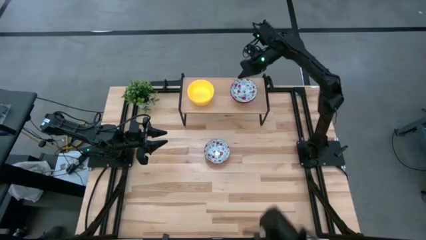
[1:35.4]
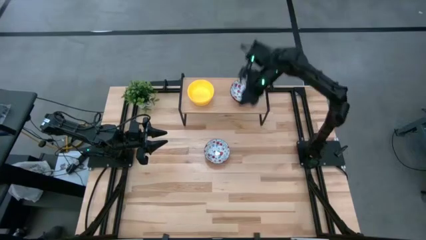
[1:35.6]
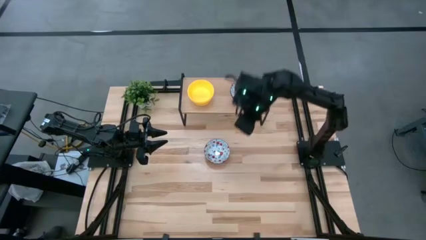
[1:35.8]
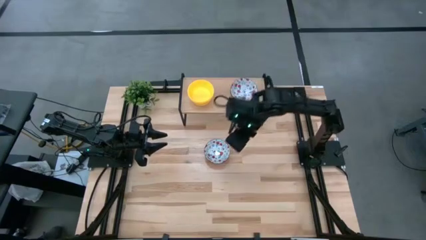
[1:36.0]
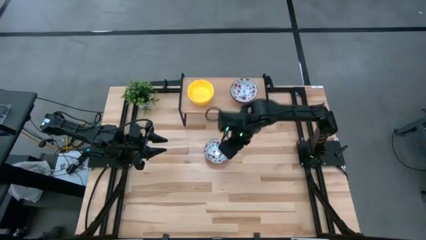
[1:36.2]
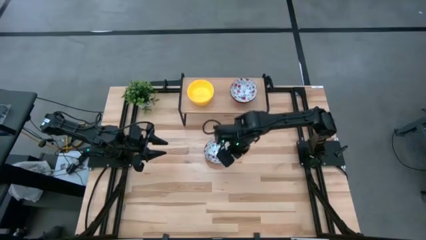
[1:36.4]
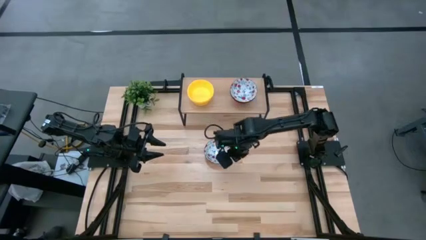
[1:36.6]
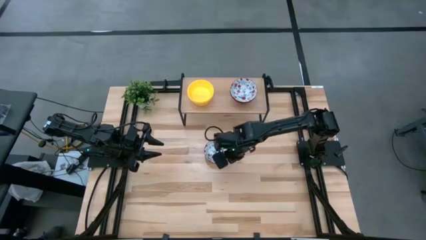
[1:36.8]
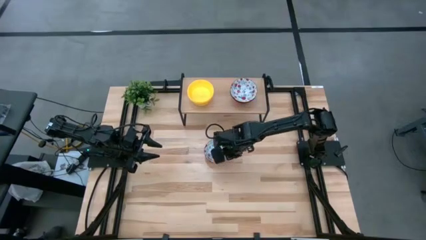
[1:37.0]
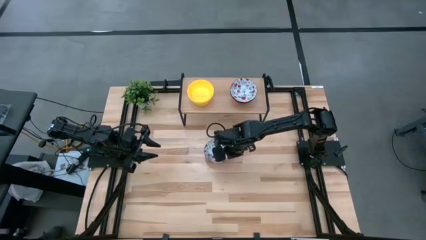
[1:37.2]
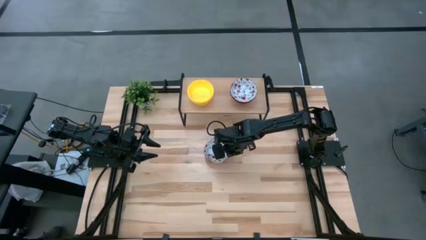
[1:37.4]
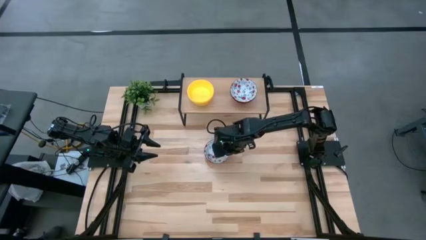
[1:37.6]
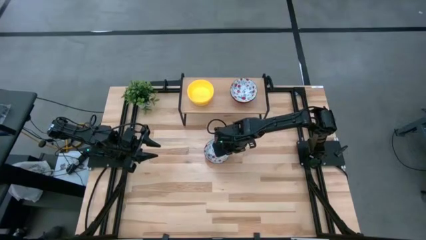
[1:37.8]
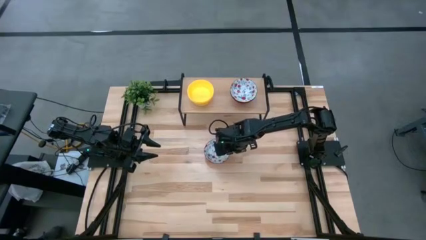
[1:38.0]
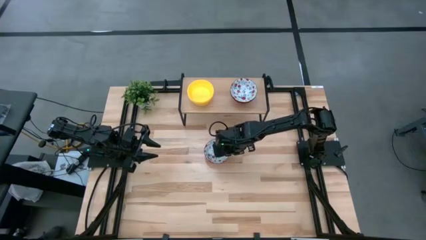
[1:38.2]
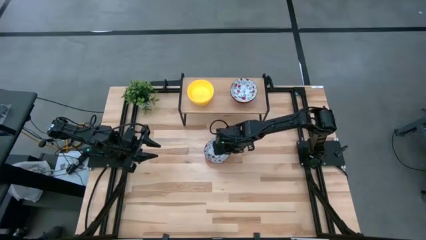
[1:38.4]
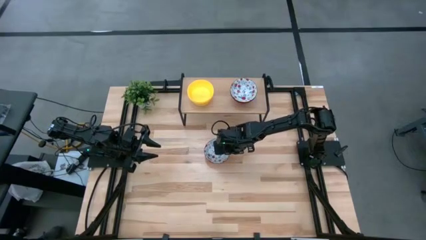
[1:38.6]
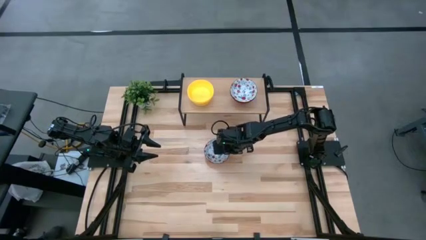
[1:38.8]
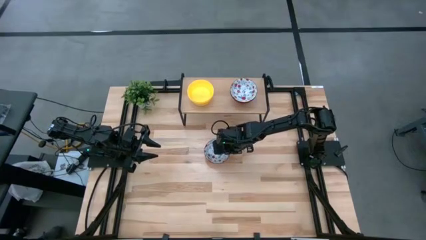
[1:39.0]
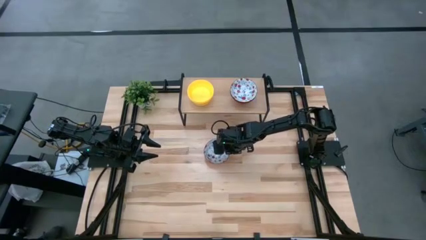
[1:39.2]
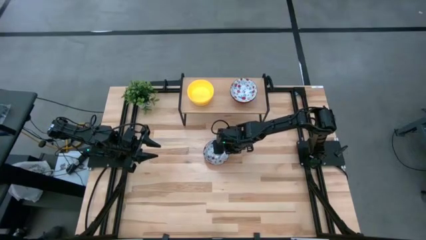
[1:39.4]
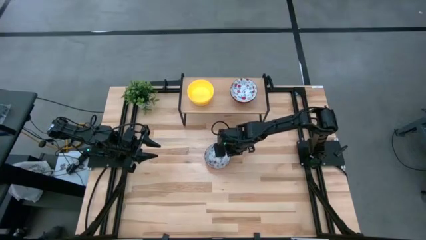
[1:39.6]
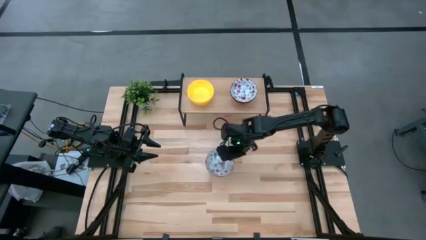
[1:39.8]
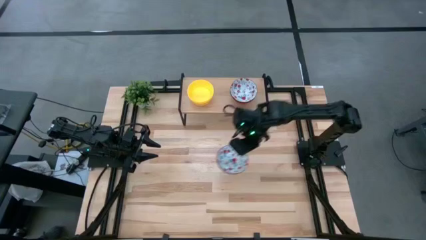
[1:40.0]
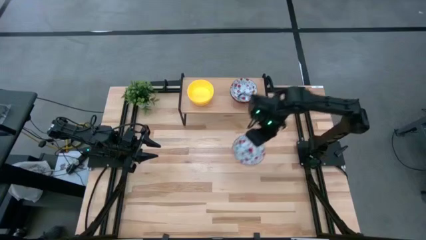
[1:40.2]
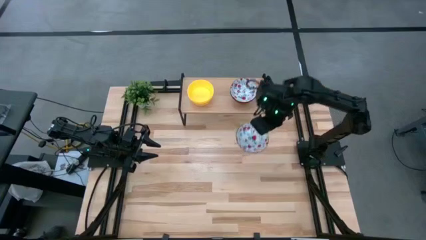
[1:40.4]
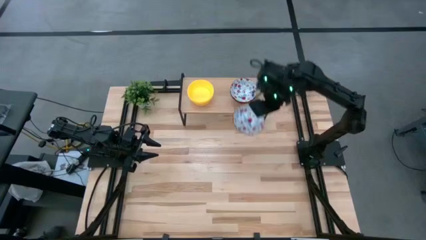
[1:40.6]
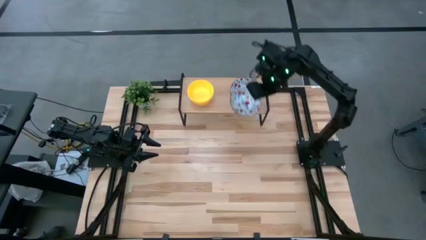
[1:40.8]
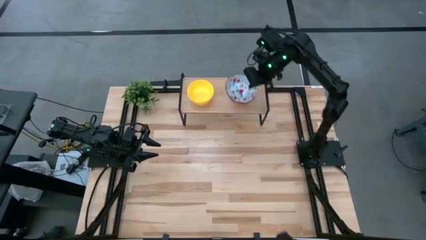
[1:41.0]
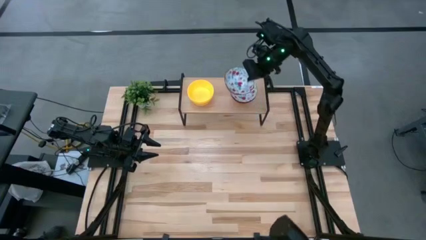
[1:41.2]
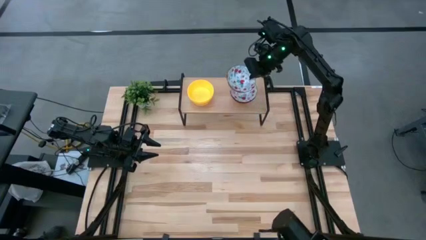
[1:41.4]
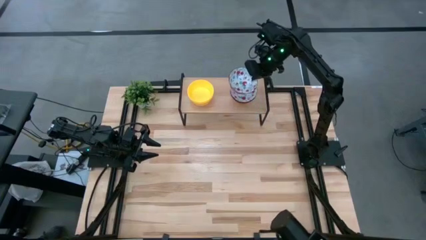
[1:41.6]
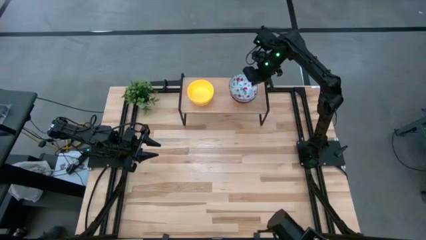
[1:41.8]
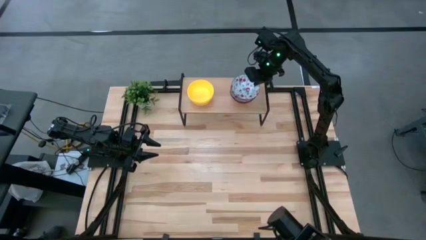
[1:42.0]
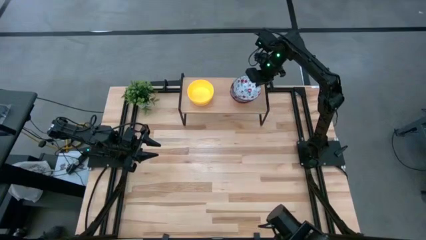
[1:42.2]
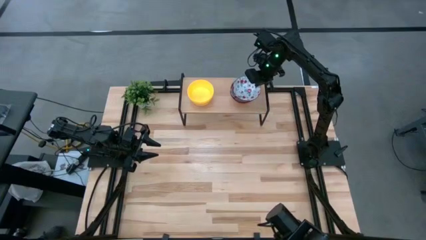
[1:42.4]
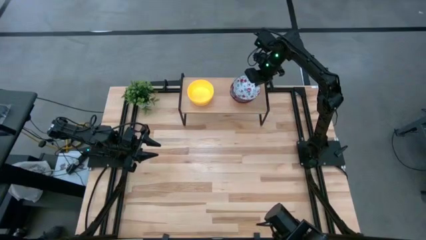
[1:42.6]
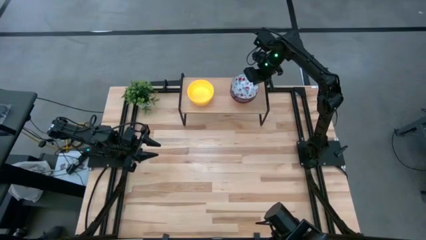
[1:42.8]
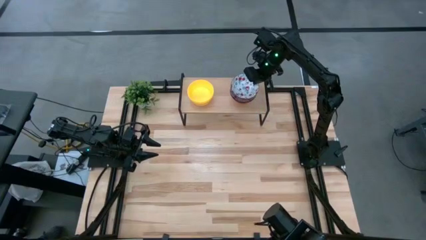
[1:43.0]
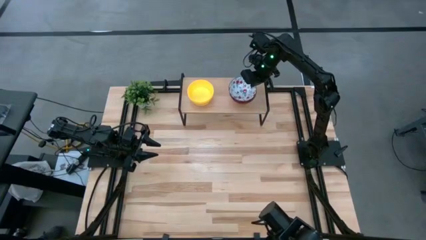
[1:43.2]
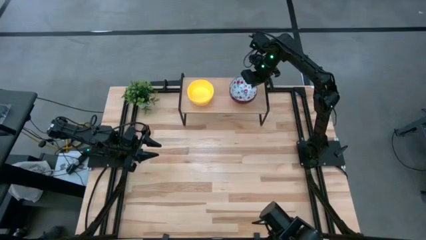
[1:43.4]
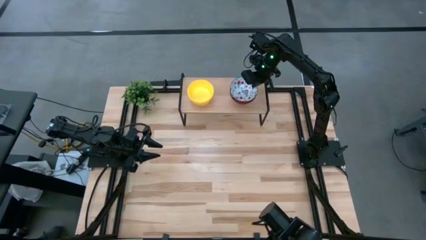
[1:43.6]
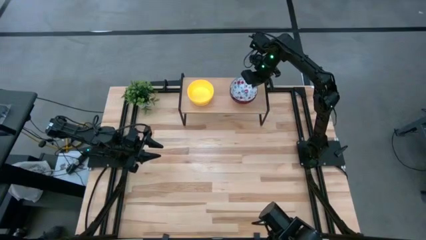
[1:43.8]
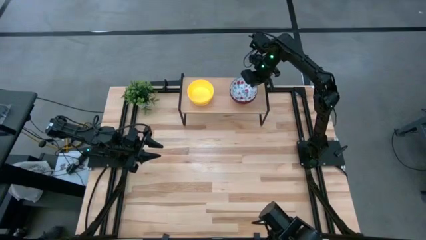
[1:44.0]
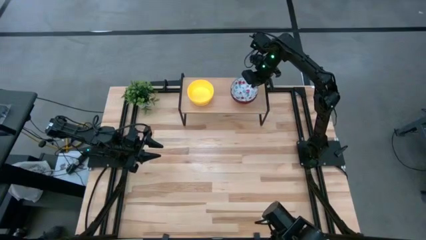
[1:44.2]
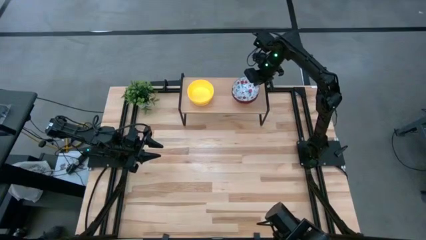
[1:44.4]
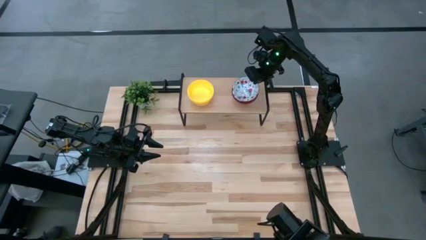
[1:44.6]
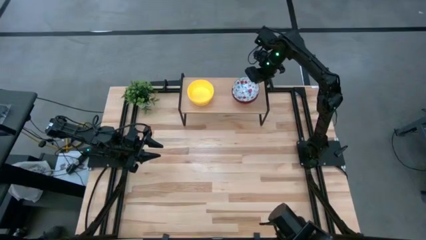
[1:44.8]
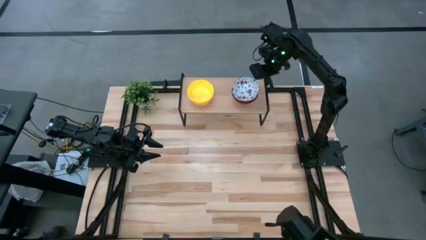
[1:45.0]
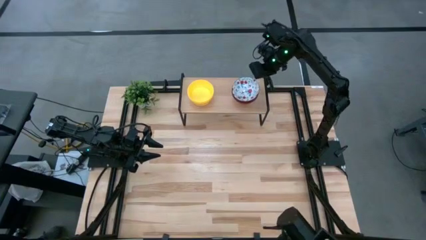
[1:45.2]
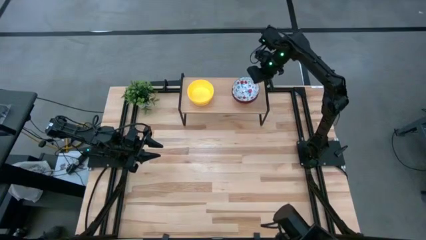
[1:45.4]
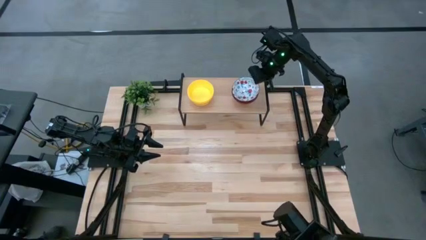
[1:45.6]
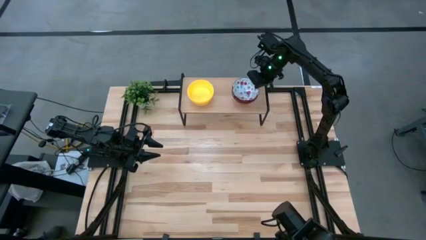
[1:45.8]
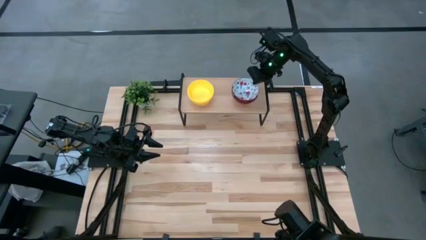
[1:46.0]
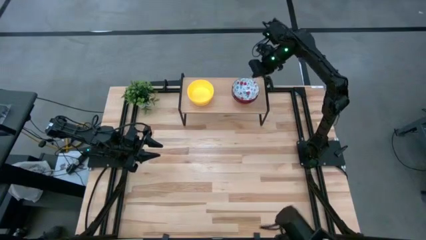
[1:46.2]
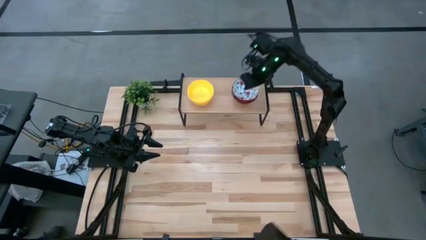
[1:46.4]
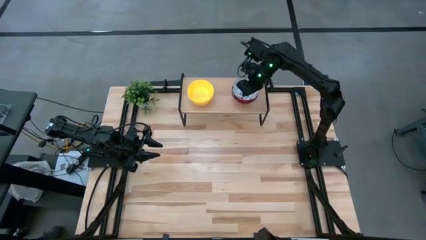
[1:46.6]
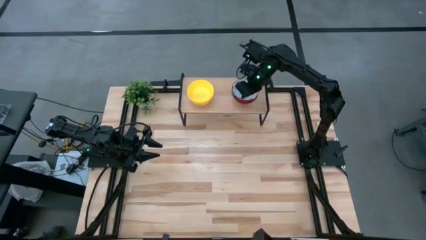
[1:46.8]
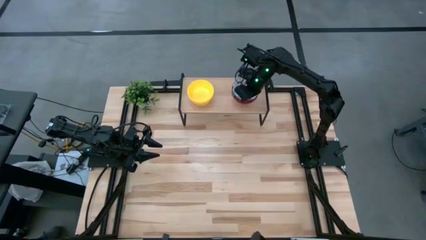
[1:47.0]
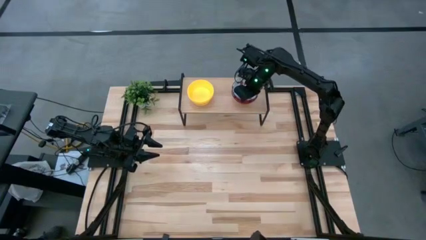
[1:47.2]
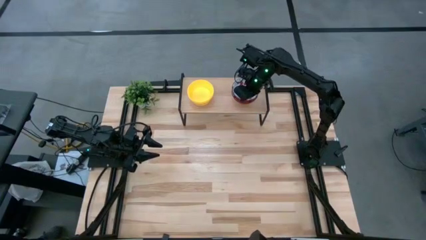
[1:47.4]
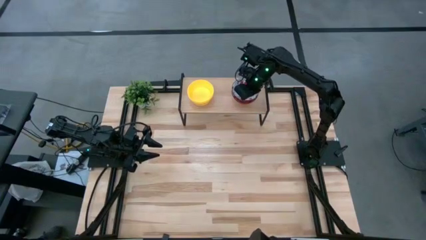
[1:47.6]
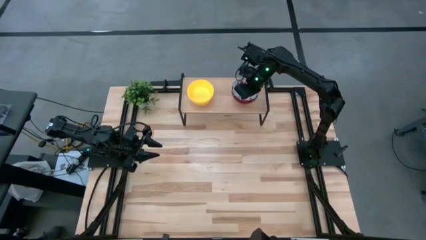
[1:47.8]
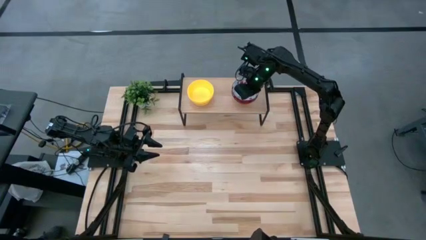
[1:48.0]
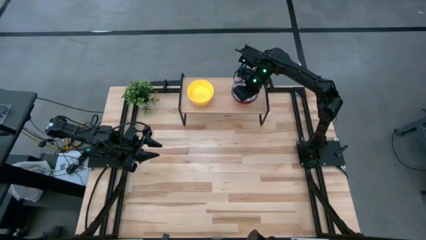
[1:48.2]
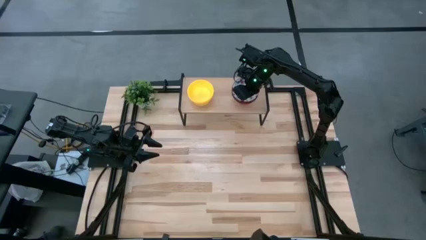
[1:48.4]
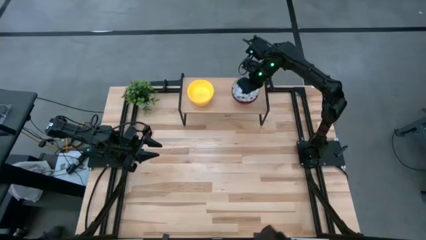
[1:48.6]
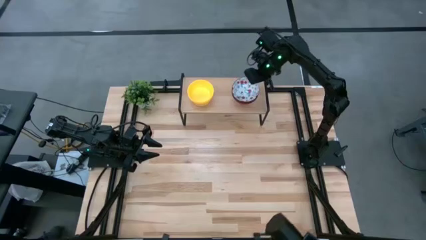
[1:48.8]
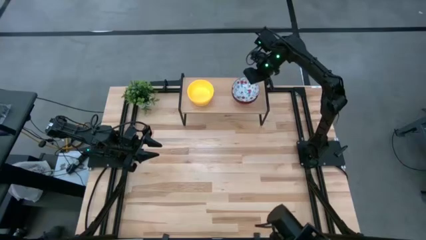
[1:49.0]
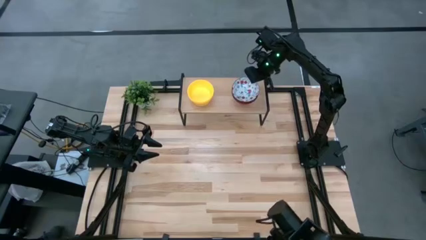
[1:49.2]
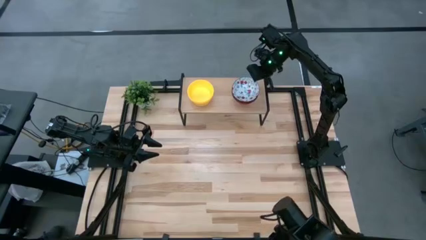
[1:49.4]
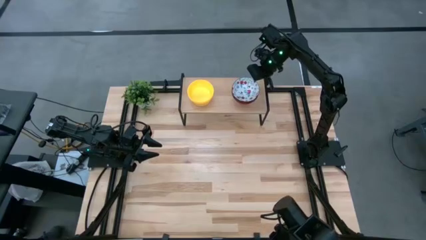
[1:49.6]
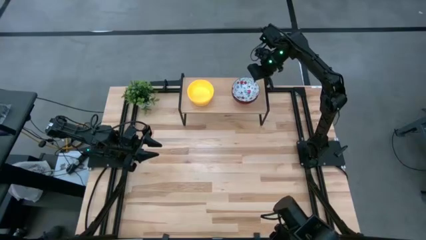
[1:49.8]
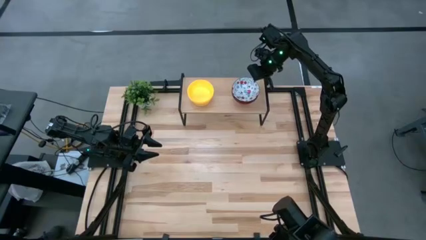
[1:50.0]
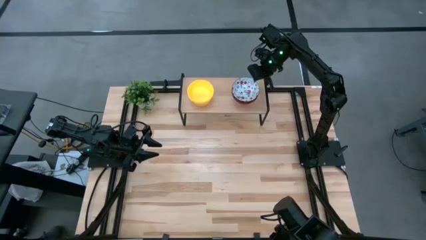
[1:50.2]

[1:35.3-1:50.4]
Task: Pick & Place Mini bowls
Stack the white bowl on top of the white bowls on the shelf

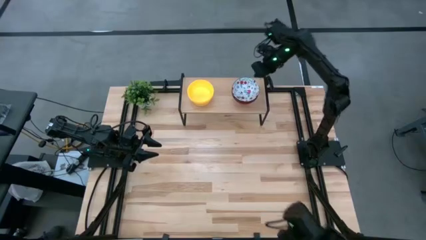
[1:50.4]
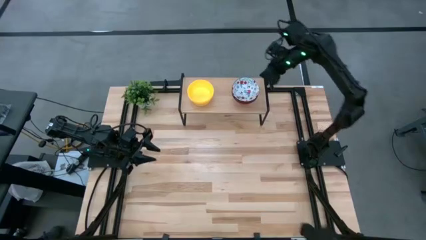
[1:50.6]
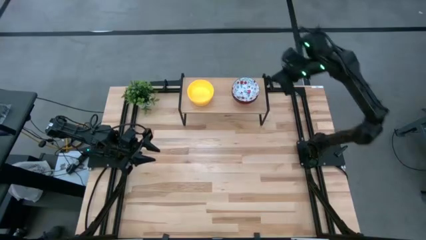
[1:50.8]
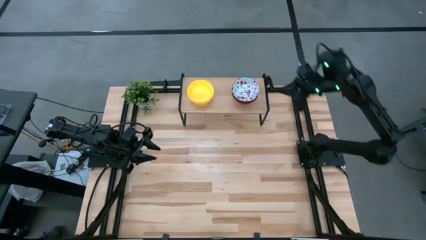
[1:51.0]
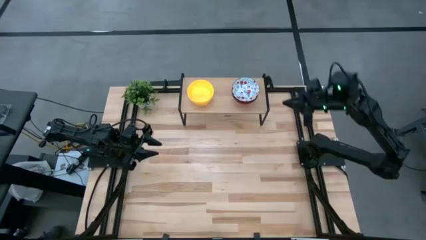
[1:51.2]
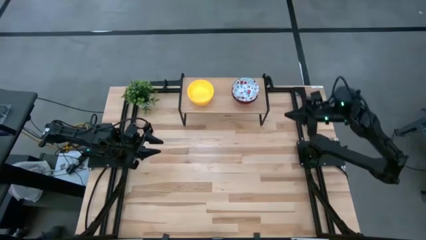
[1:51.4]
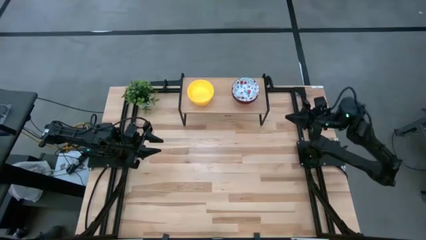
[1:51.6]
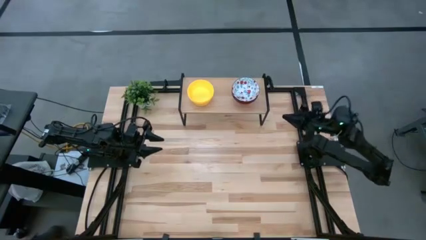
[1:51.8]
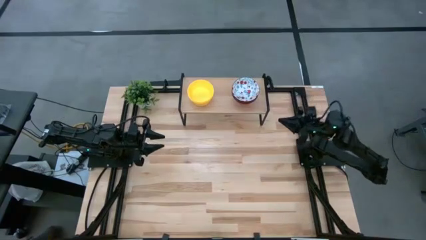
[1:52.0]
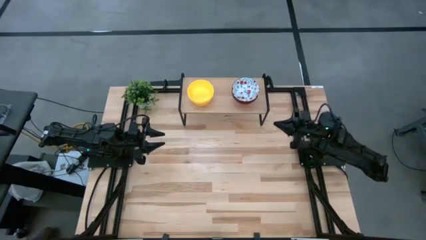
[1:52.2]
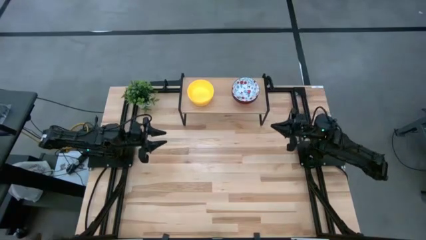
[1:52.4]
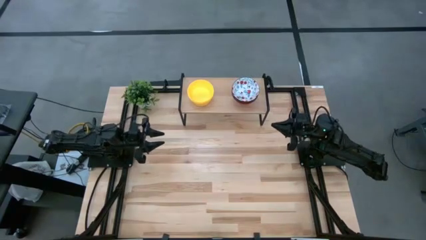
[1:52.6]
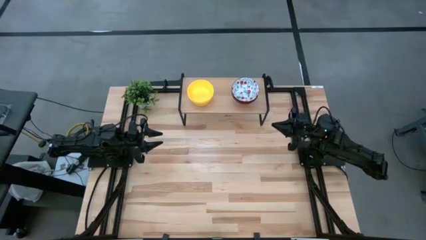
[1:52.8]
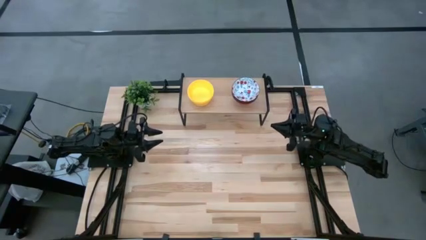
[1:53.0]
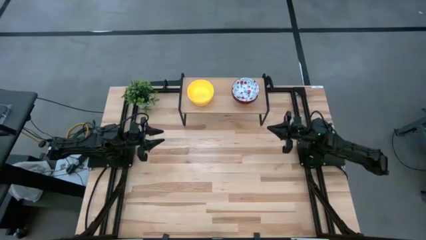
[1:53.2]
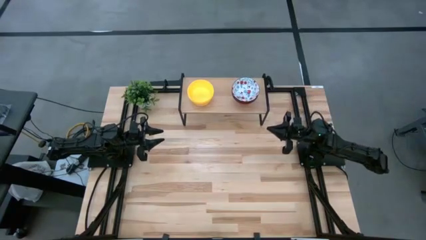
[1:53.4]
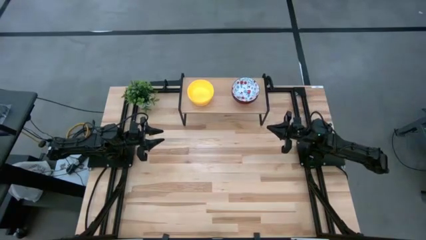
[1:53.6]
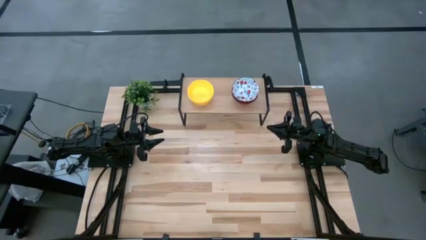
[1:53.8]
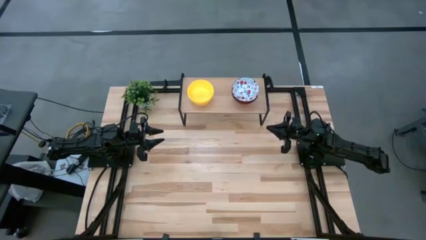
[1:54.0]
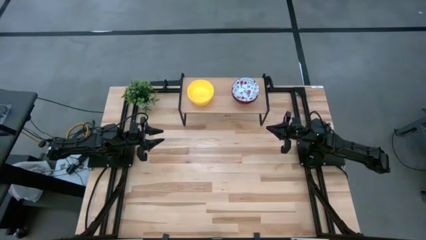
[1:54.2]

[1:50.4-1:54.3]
Return to Home Position
